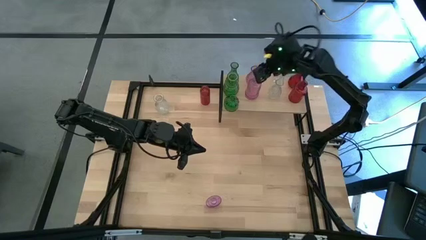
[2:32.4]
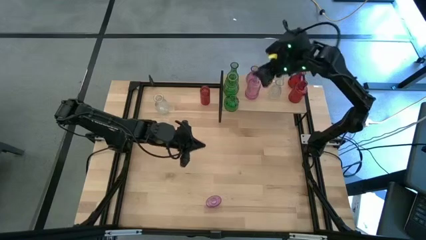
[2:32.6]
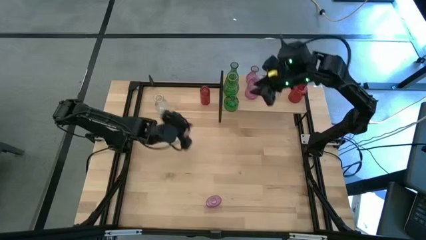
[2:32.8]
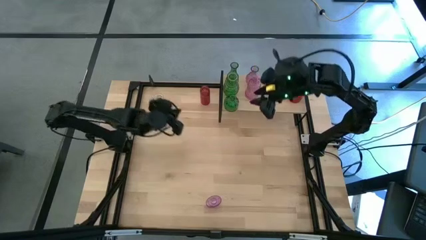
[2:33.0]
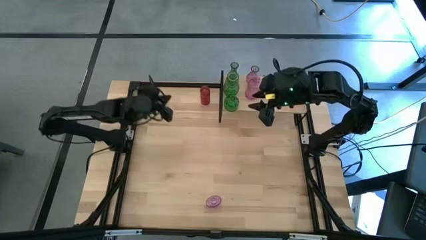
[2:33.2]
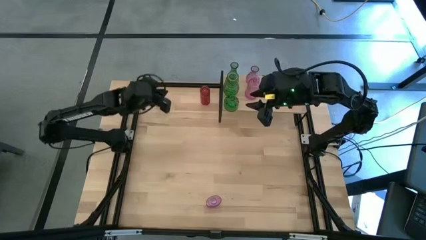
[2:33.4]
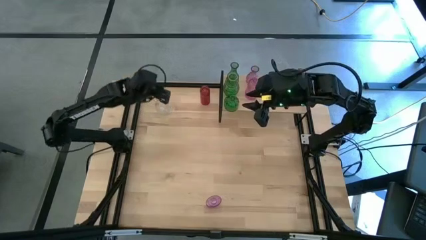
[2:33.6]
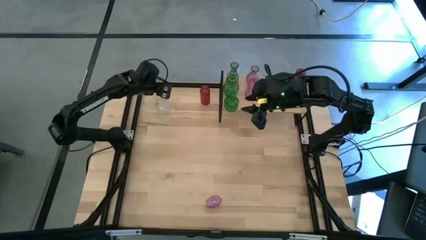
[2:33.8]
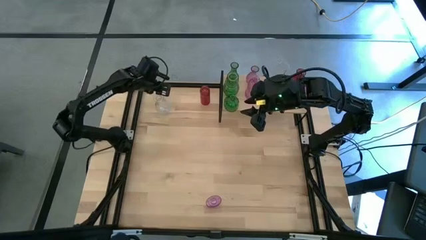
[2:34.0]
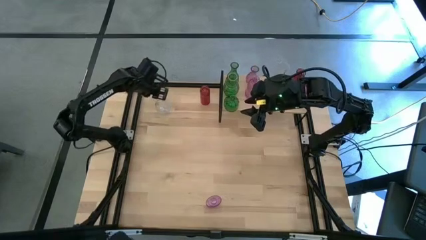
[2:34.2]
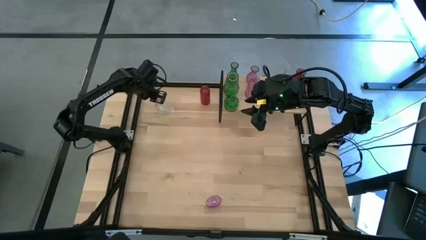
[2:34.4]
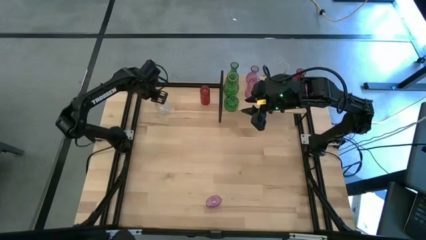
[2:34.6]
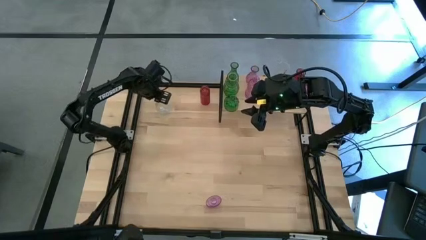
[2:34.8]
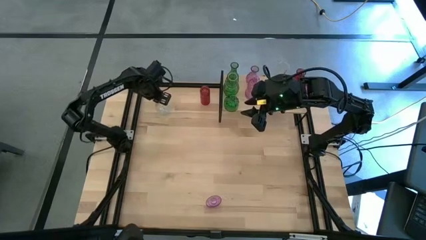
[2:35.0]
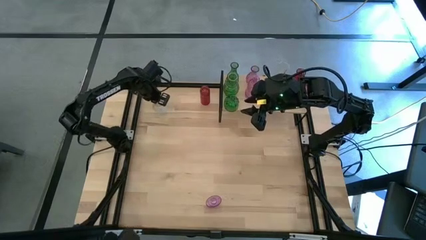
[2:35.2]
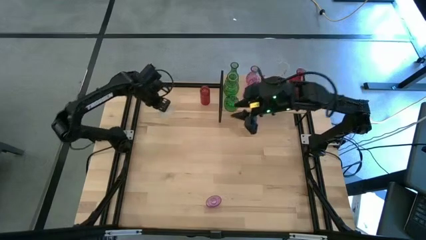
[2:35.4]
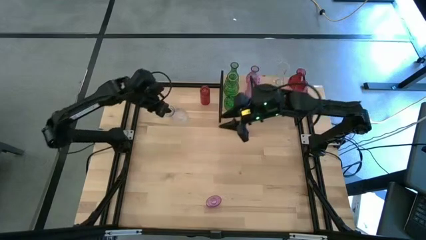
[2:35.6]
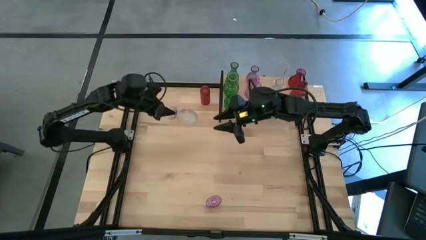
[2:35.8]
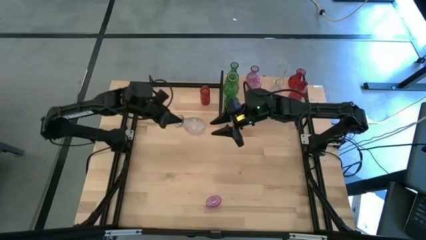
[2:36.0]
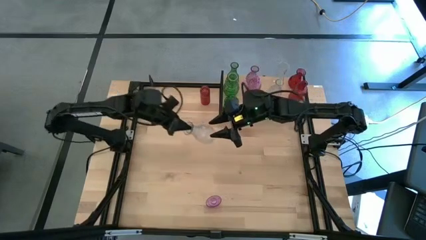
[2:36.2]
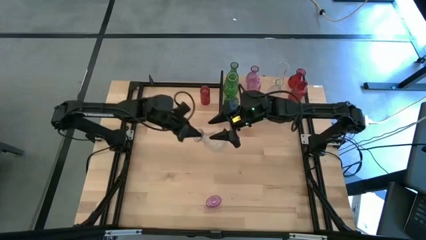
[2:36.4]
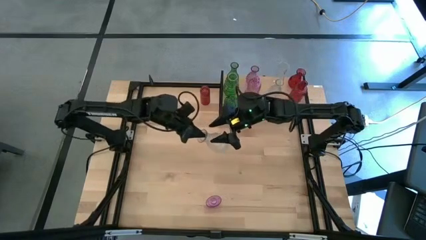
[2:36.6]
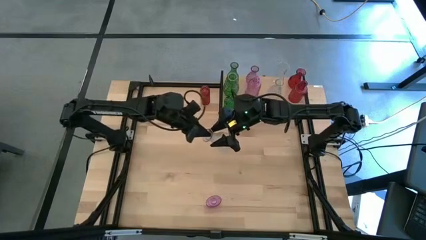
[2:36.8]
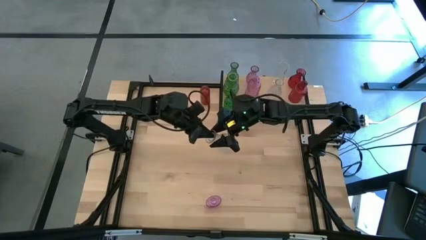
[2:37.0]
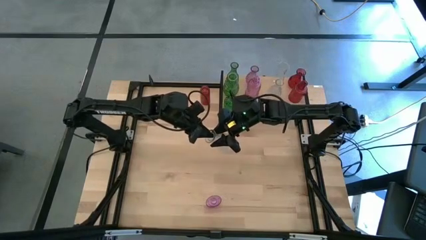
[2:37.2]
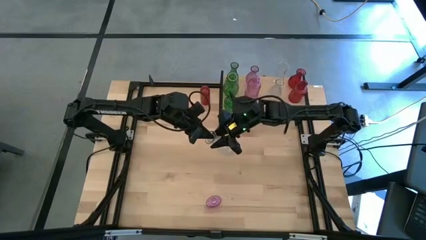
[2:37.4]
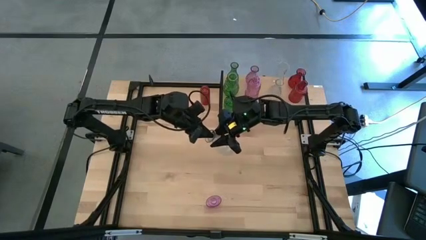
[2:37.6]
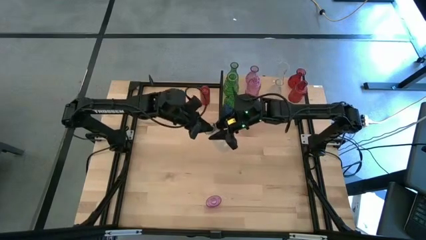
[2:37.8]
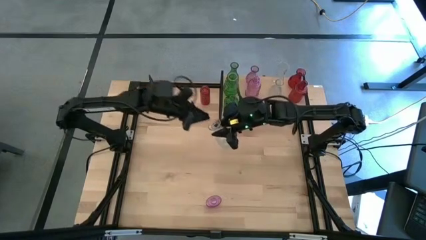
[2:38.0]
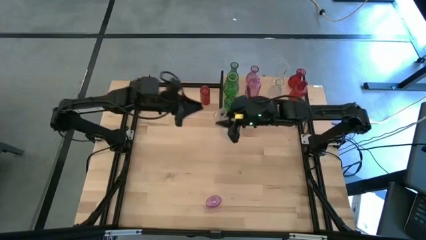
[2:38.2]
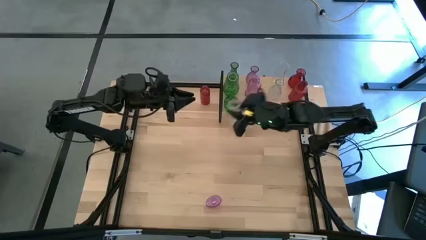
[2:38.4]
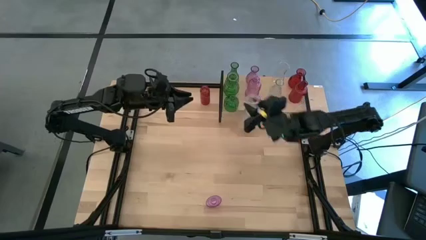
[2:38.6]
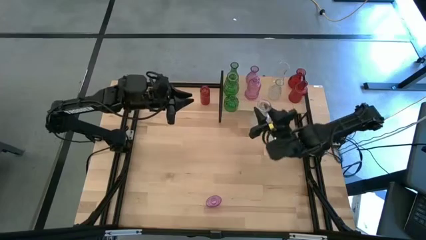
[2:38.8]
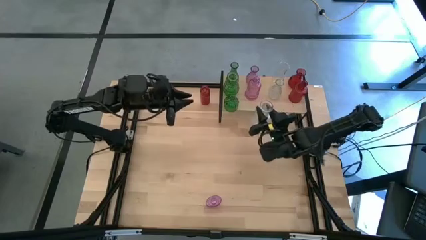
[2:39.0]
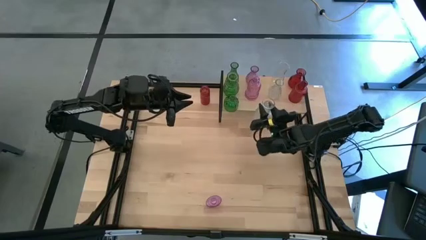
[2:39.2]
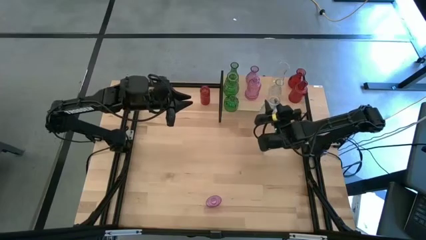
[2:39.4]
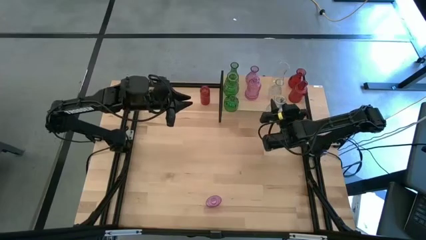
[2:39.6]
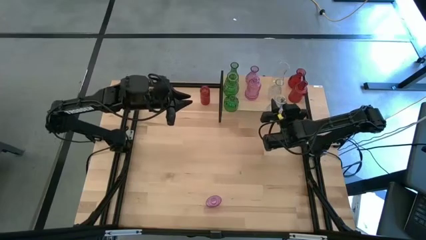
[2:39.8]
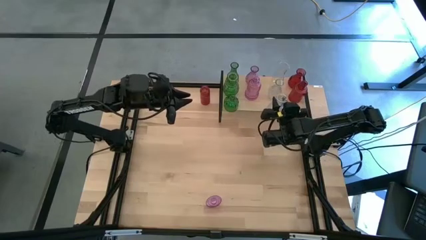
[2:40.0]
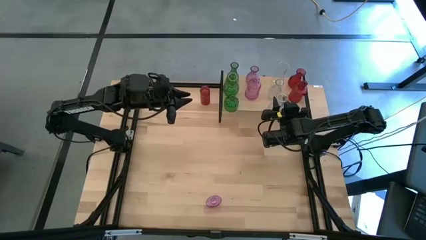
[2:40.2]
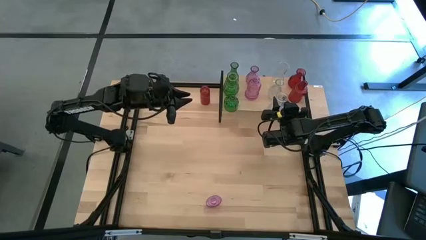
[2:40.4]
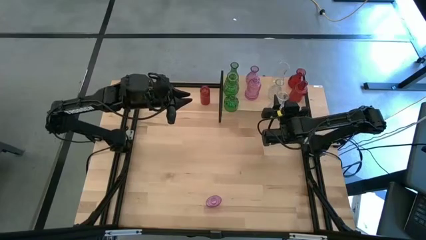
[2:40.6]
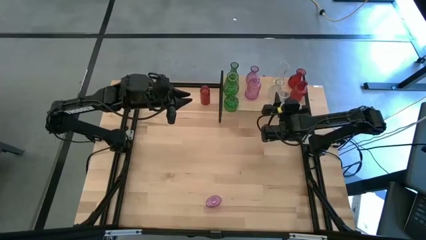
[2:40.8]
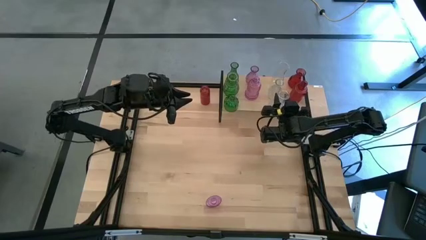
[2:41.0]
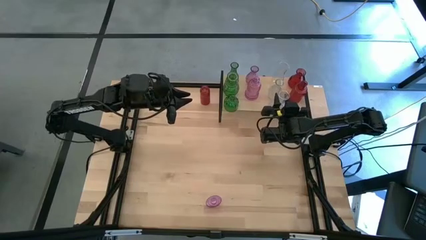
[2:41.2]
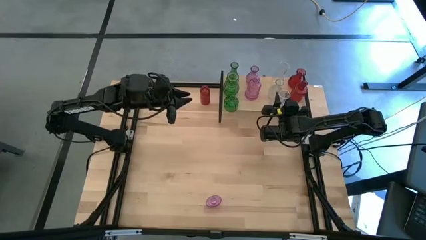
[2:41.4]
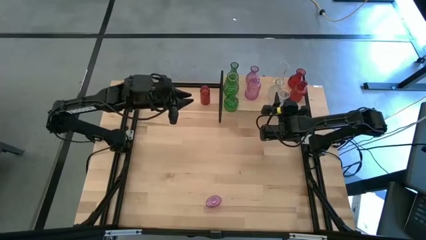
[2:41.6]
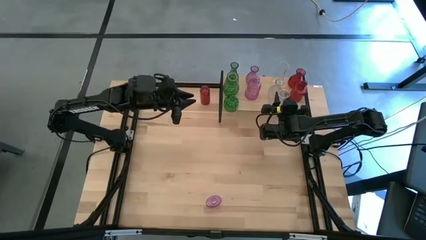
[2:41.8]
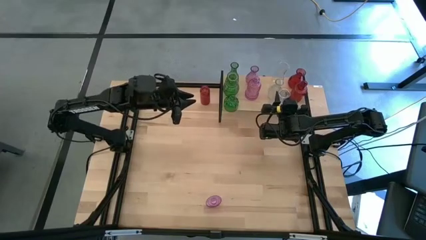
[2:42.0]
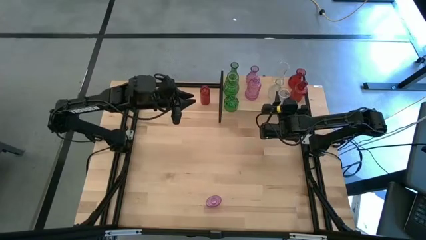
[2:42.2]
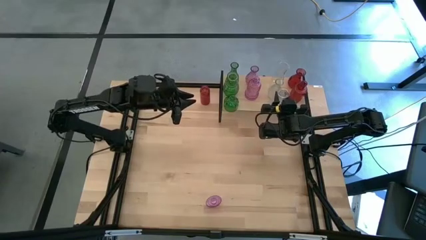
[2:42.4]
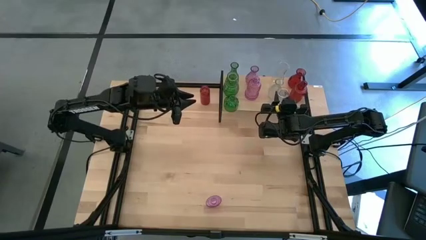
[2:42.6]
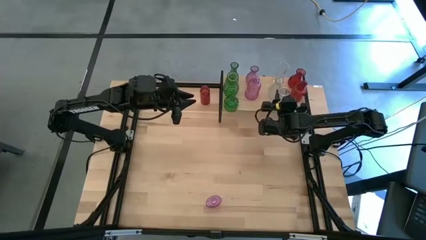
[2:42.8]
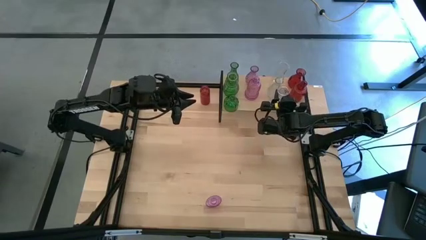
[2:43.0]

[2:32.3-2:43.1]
Task: sort vases onto shelf
Put the transparent vase on the shelf aligned with the other transparent vases

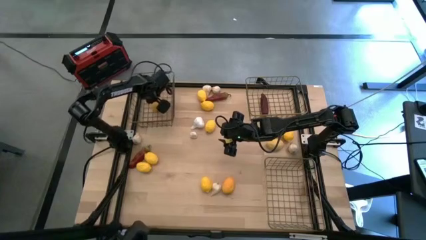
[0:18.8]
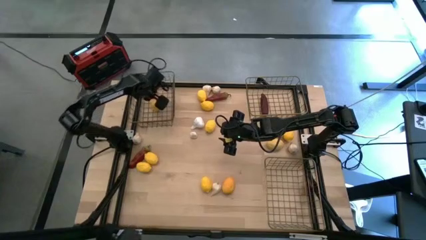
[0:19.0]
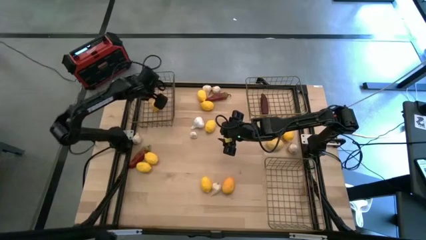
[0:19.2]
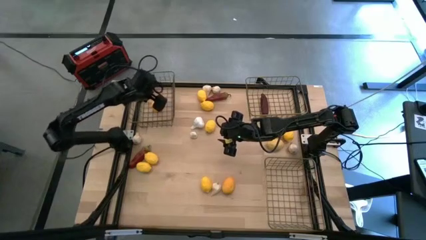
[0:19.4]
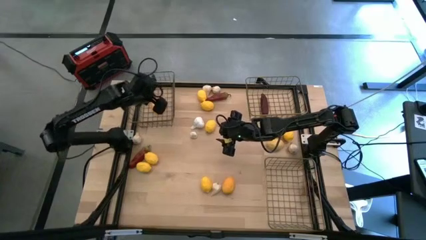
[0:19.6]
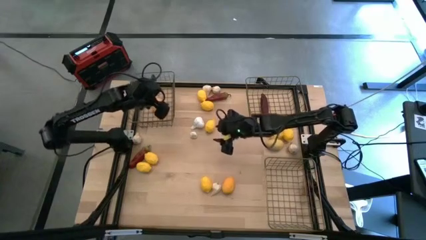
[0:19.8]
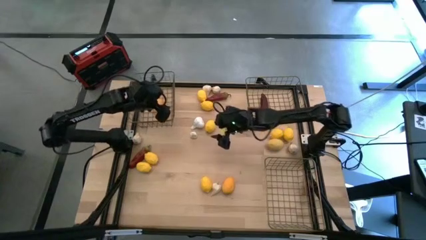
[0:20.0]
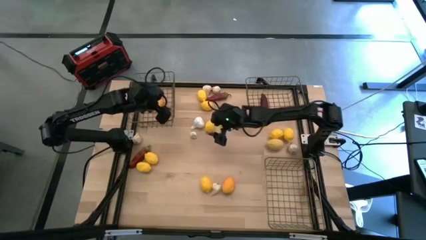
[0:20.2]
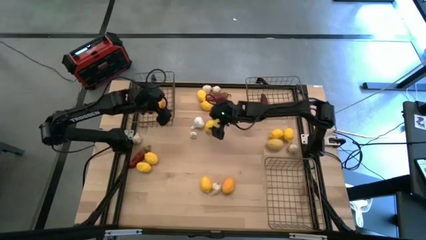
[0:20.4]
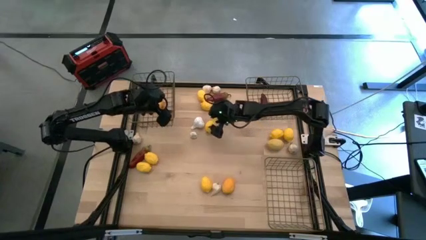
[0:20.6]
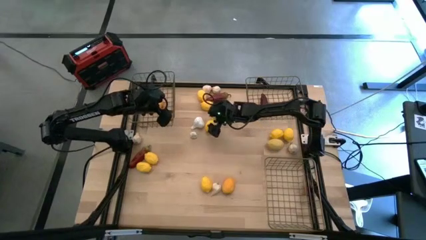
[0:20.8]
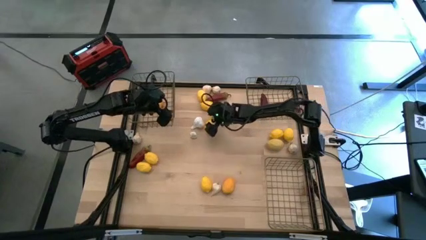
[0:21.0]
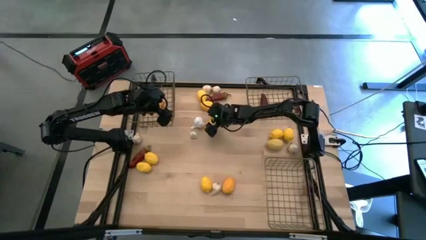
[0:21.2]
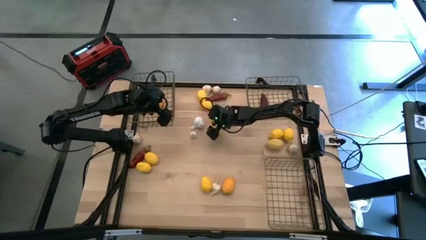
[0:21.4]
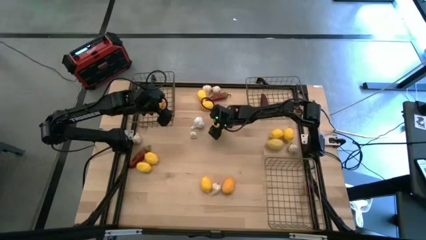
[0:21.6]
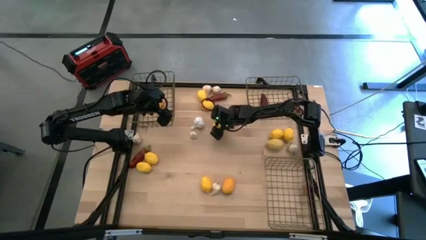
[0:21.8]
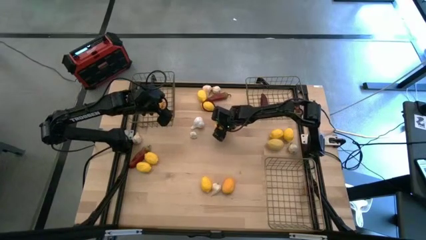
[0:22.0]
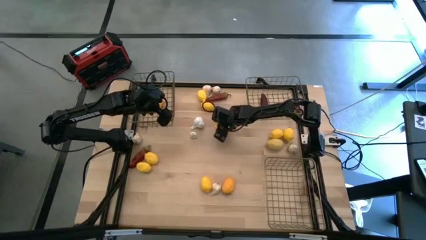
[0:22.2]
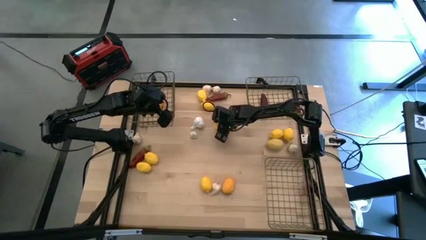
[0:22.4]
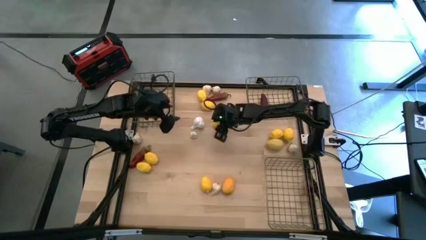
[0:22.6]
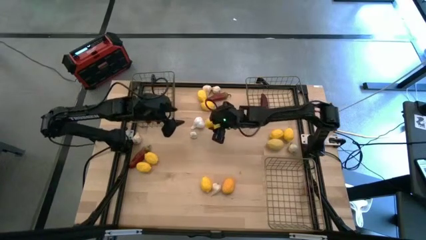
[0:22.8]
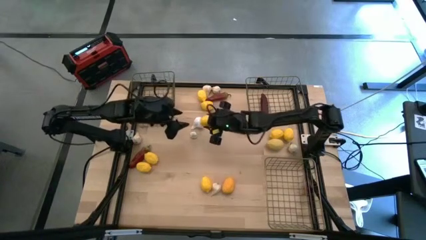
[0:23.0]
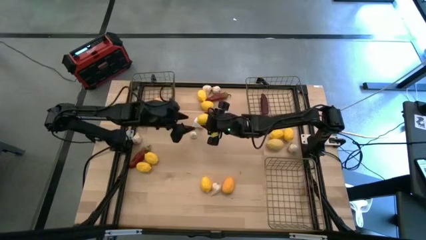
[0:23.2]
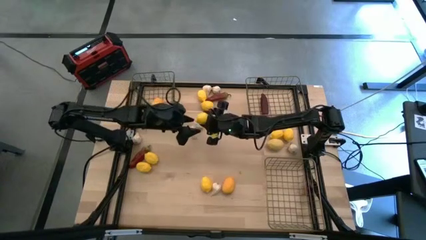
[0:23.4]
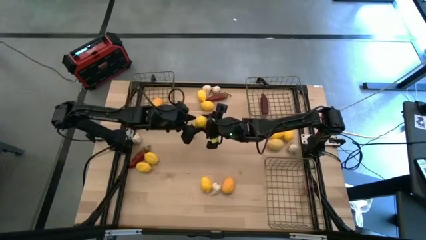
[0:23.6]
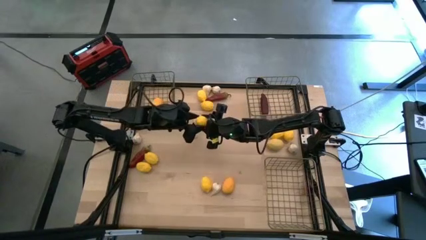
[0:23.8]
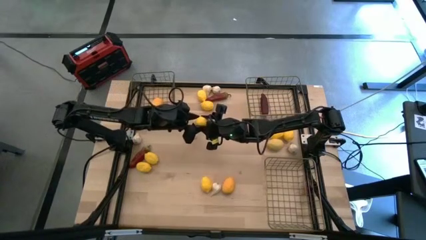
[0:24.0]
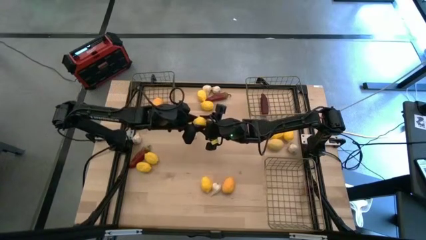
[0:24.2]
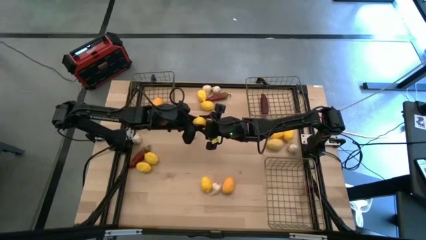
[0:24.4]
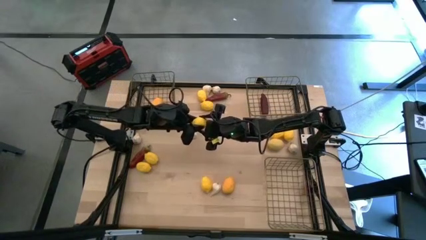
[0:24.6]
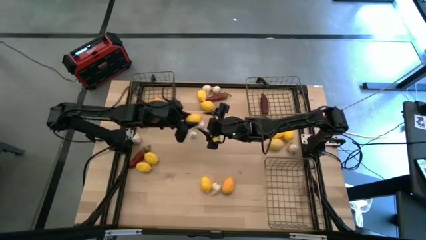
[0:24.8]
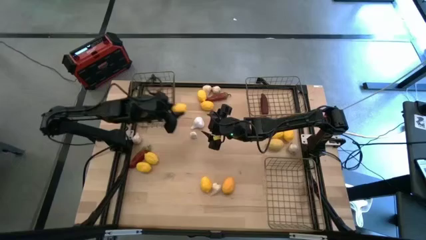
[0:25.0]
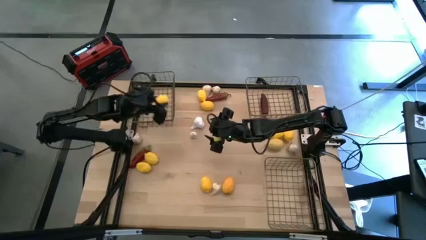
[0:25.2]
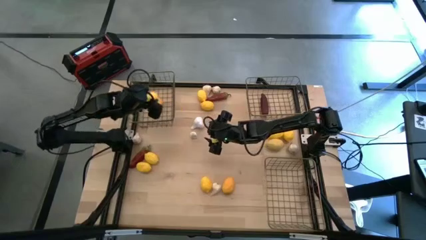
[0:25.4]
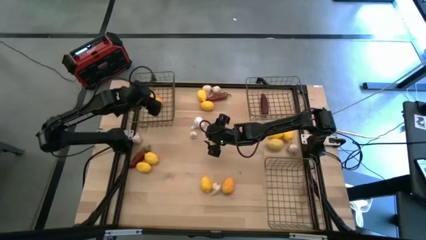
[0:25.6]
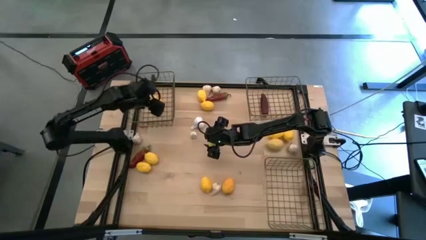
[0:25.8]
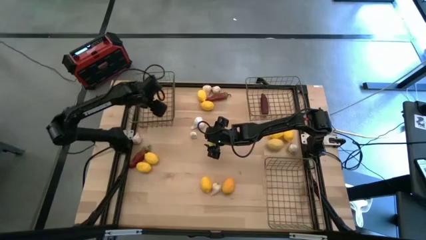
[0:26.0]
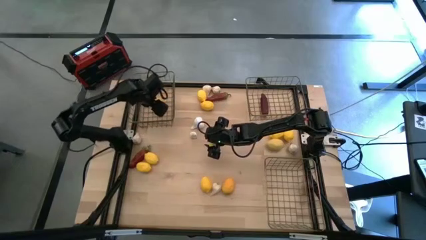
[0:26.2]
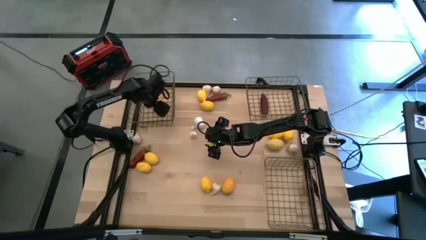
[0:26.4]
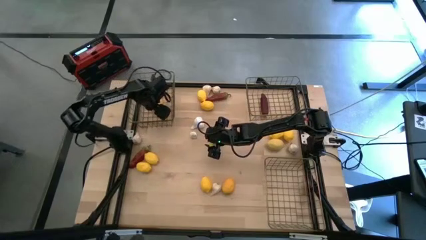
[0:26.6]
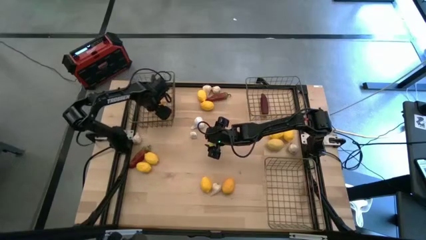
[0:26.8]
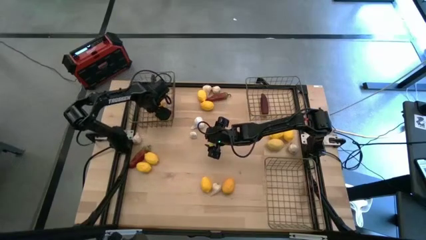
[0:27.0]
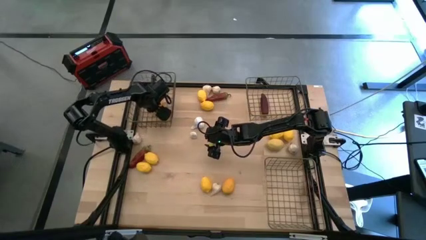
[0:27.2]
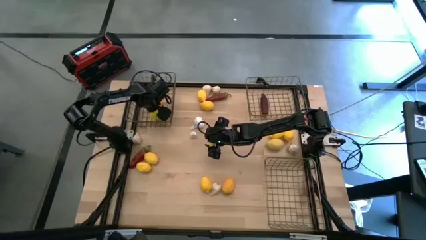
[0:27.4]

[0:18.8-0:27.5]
Task: Sort produce into baskets
Put the yellow lemon into the top left wire basket
